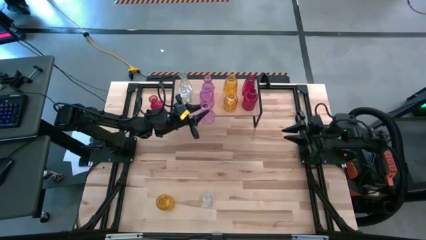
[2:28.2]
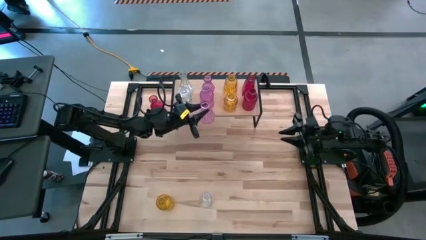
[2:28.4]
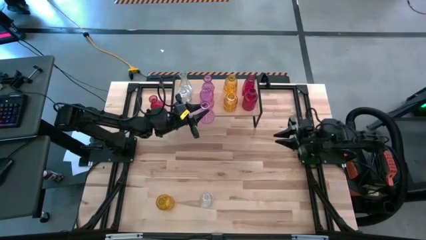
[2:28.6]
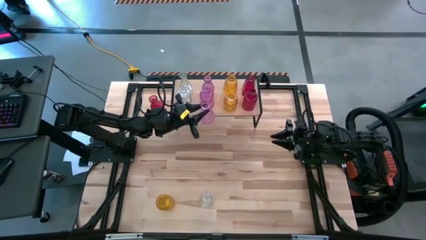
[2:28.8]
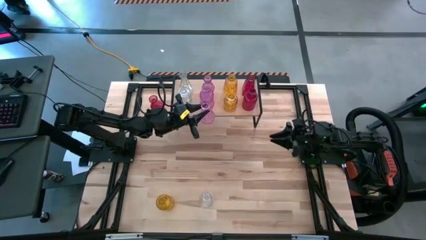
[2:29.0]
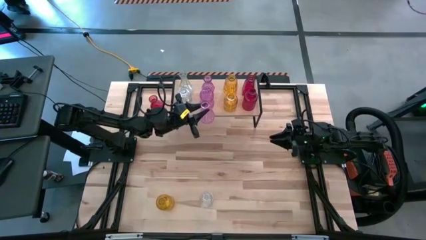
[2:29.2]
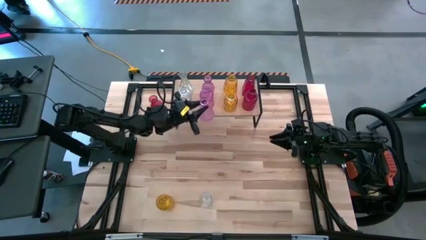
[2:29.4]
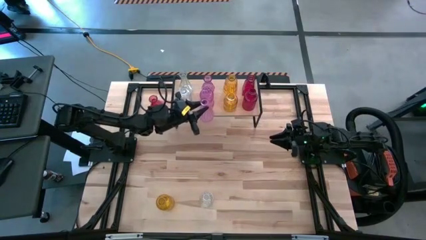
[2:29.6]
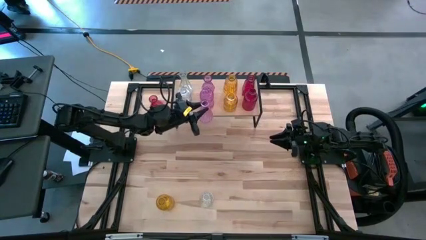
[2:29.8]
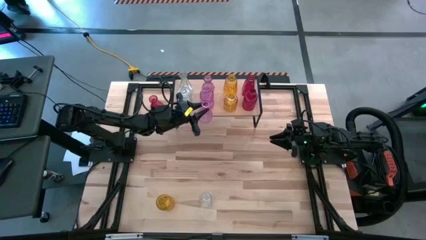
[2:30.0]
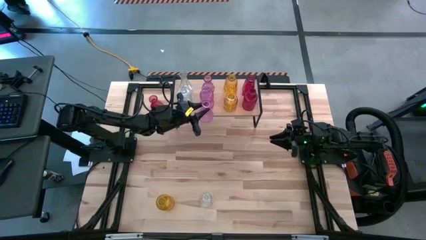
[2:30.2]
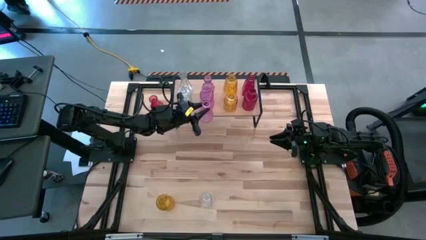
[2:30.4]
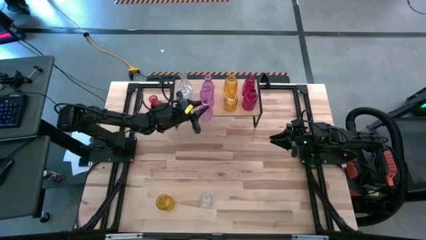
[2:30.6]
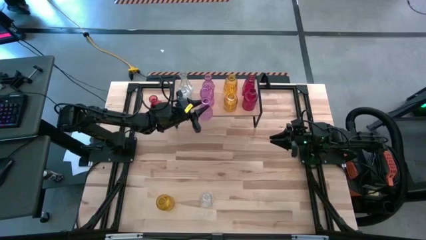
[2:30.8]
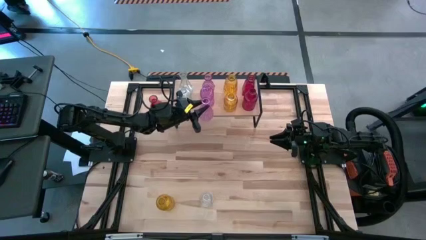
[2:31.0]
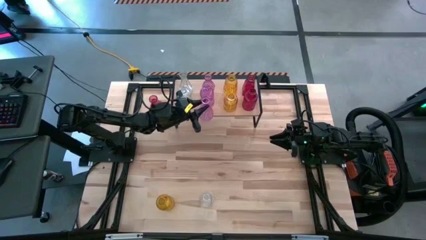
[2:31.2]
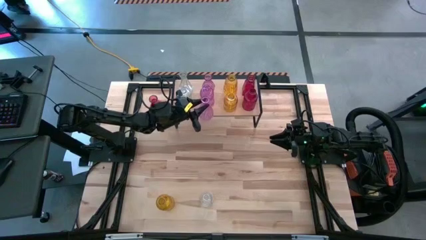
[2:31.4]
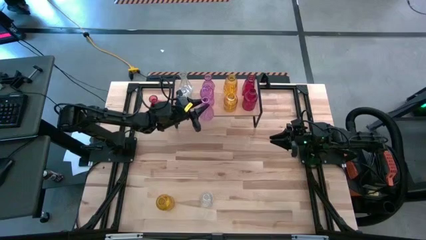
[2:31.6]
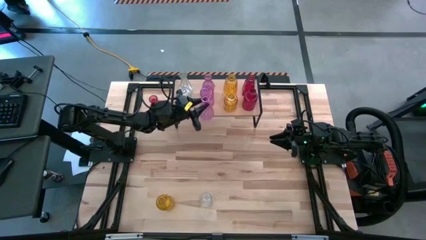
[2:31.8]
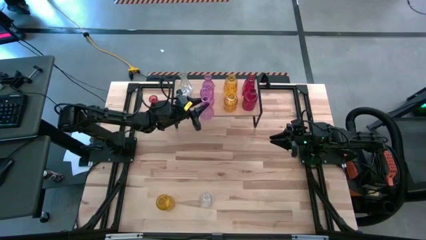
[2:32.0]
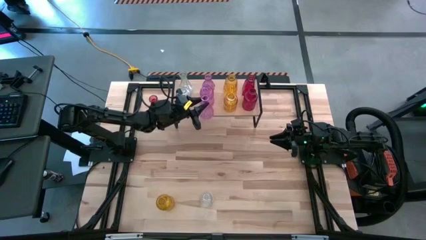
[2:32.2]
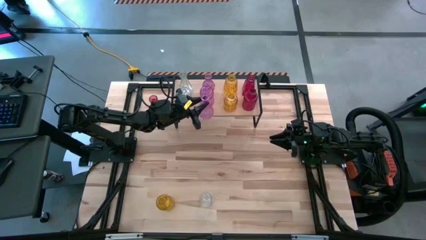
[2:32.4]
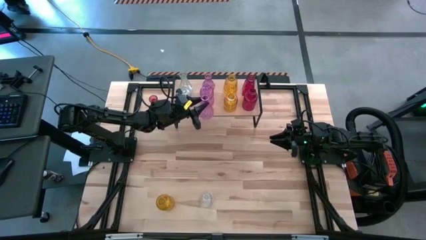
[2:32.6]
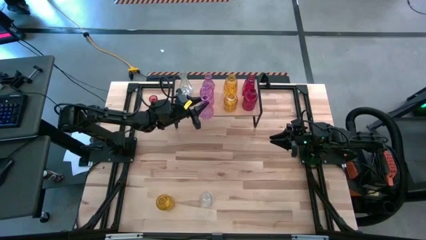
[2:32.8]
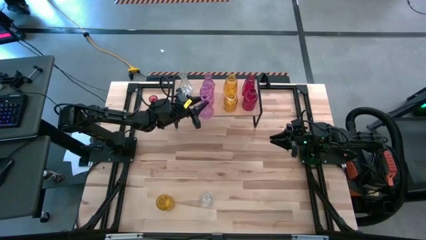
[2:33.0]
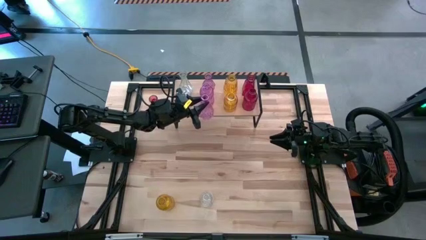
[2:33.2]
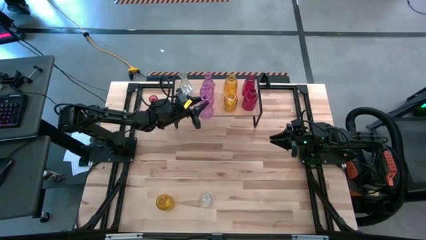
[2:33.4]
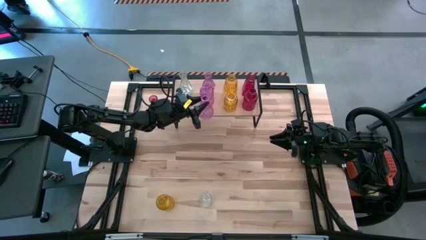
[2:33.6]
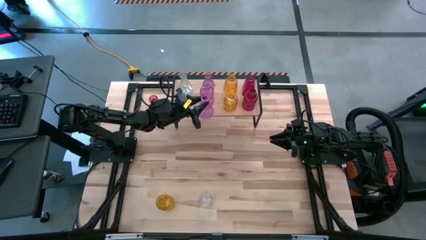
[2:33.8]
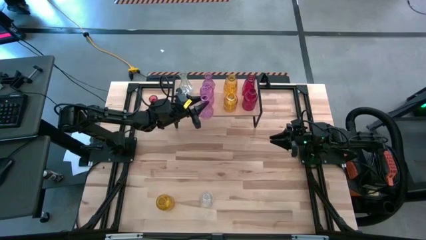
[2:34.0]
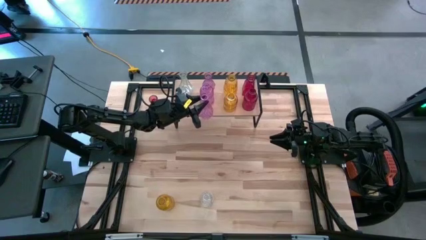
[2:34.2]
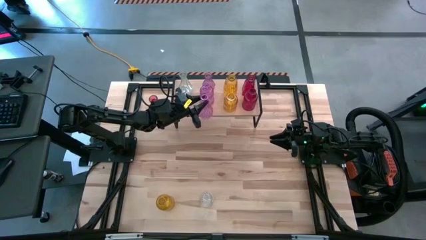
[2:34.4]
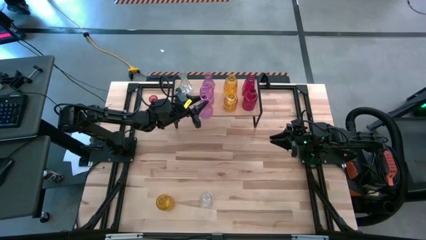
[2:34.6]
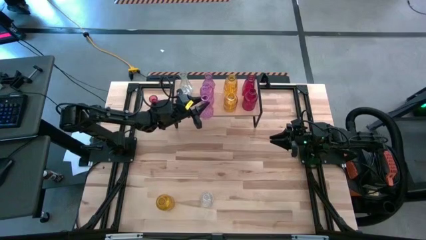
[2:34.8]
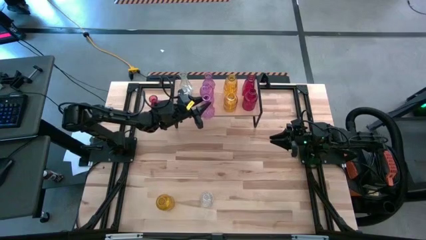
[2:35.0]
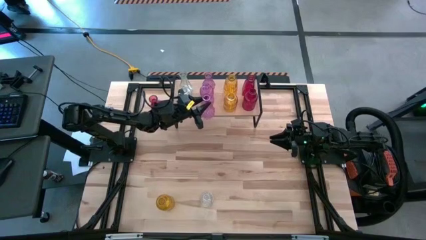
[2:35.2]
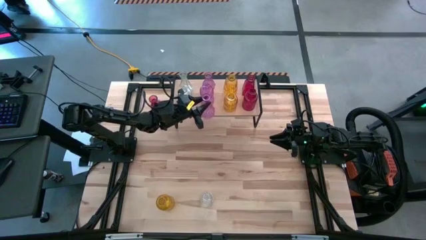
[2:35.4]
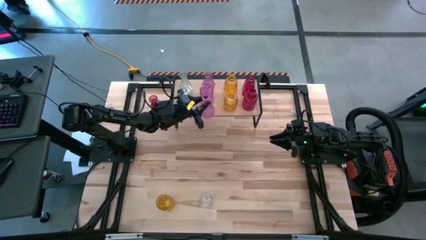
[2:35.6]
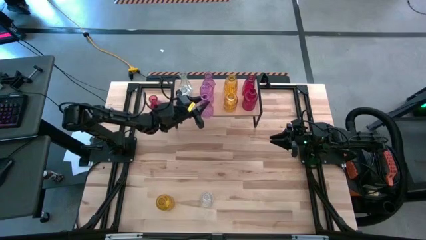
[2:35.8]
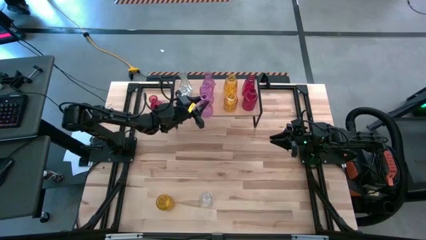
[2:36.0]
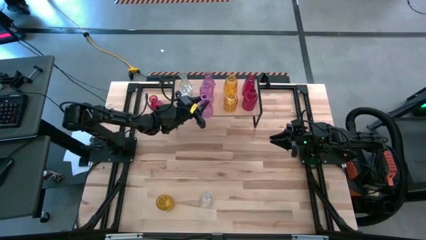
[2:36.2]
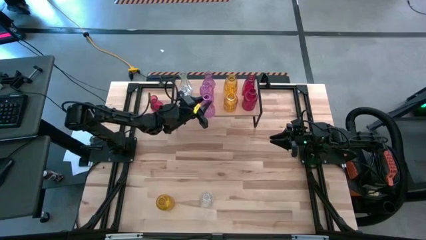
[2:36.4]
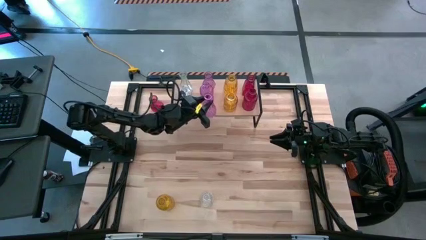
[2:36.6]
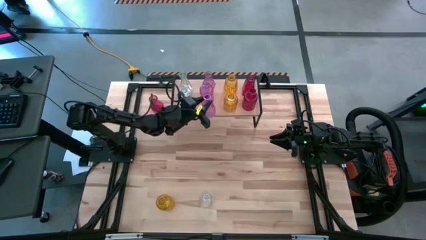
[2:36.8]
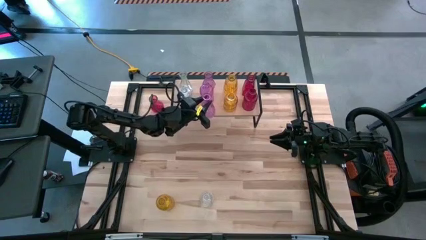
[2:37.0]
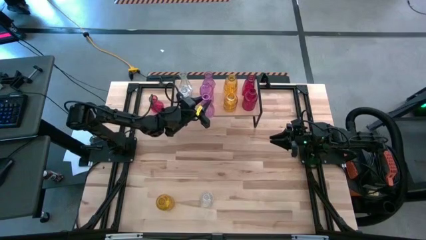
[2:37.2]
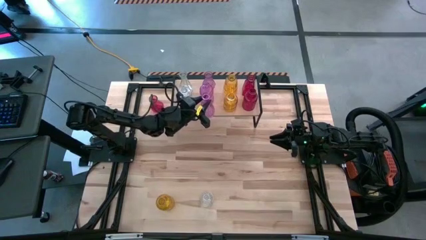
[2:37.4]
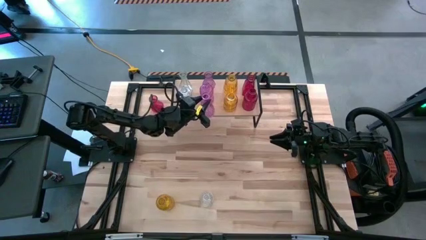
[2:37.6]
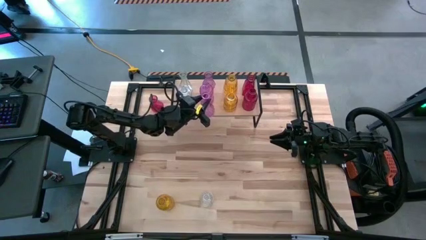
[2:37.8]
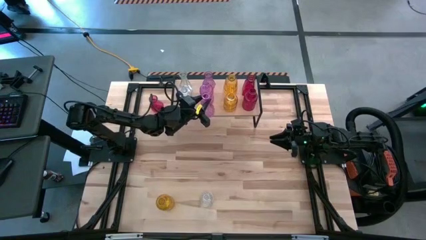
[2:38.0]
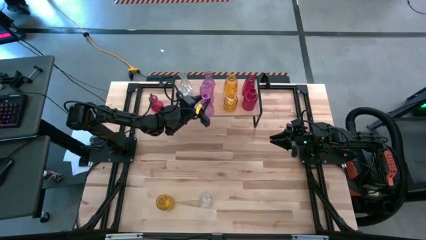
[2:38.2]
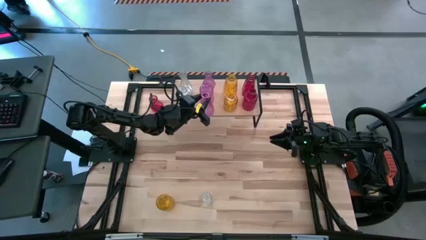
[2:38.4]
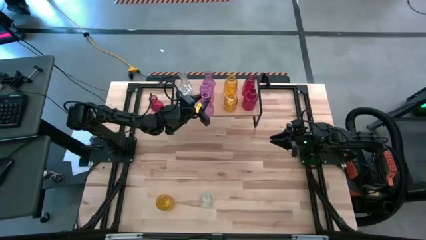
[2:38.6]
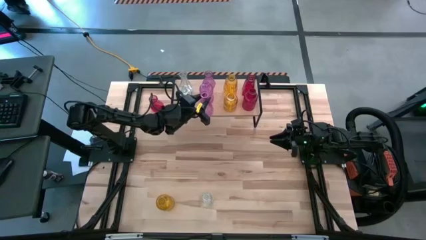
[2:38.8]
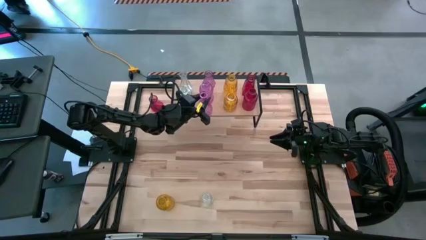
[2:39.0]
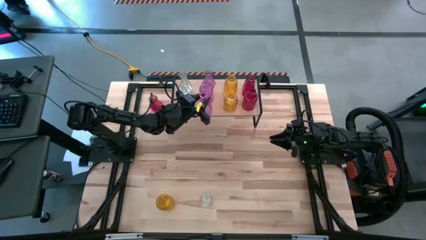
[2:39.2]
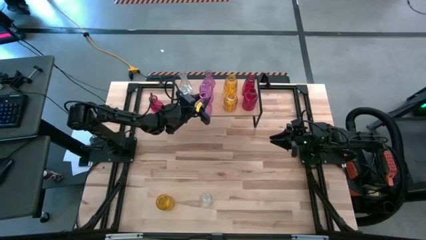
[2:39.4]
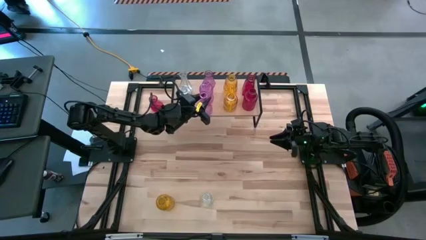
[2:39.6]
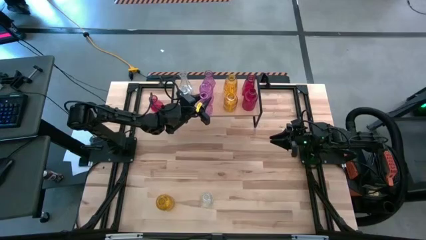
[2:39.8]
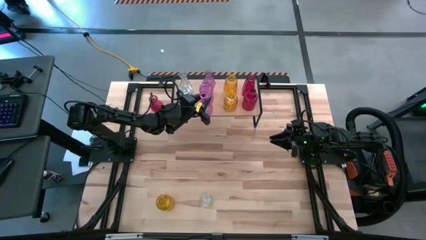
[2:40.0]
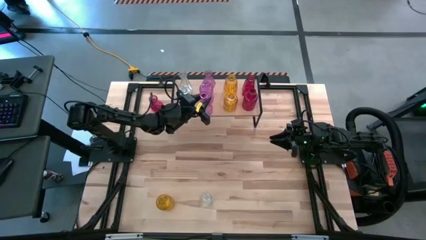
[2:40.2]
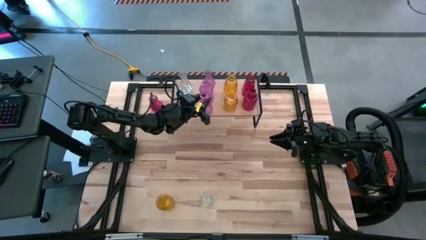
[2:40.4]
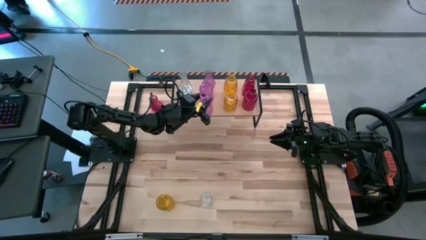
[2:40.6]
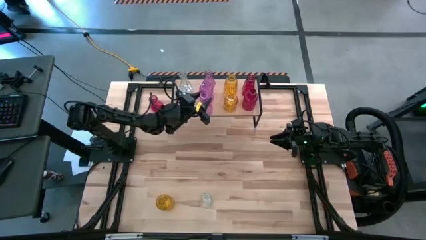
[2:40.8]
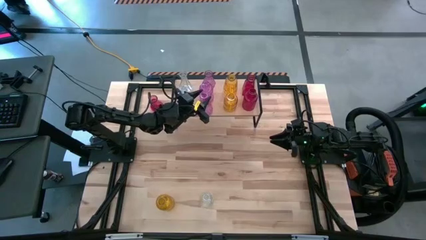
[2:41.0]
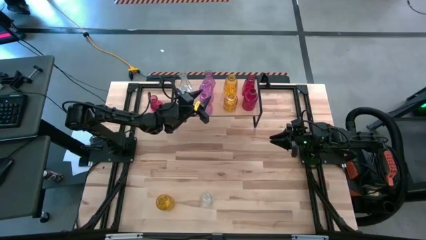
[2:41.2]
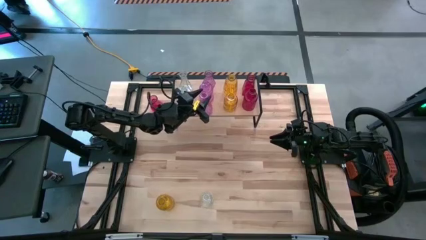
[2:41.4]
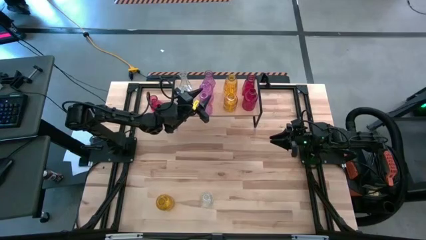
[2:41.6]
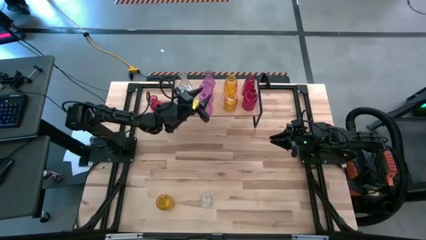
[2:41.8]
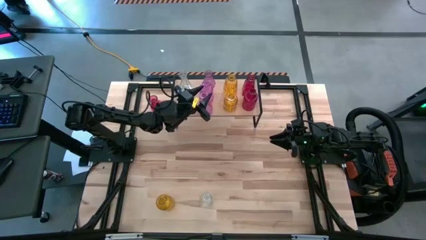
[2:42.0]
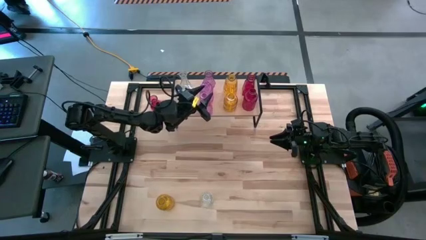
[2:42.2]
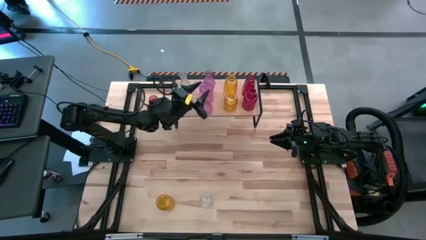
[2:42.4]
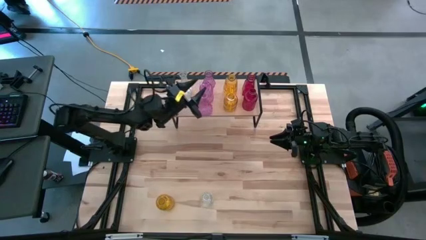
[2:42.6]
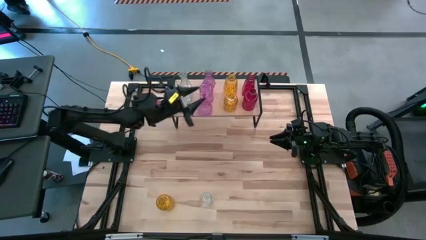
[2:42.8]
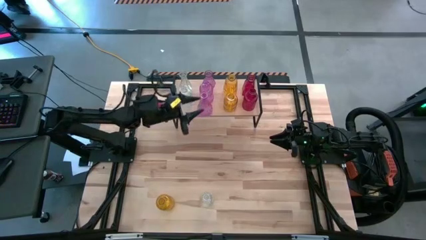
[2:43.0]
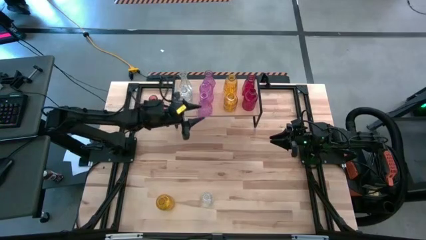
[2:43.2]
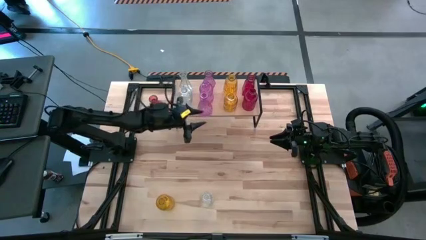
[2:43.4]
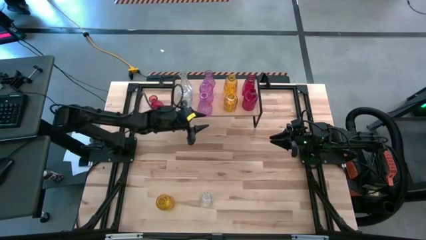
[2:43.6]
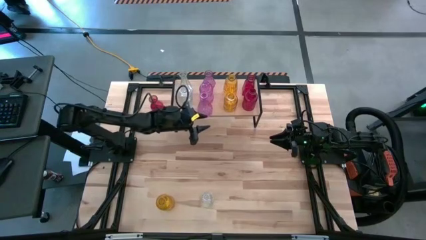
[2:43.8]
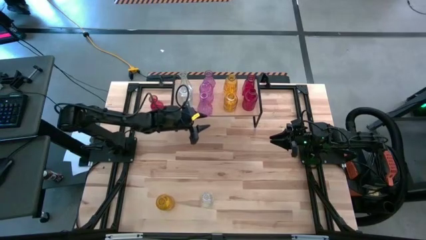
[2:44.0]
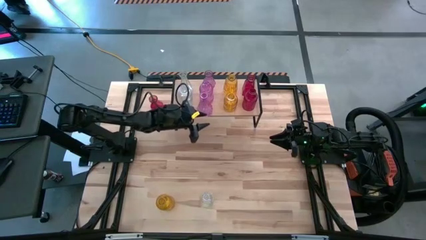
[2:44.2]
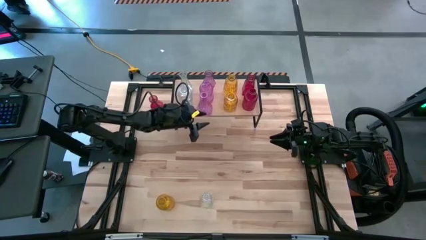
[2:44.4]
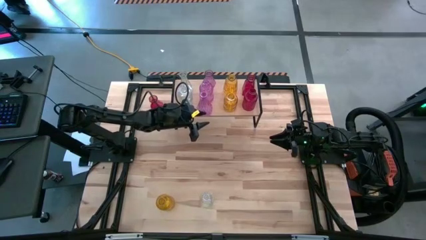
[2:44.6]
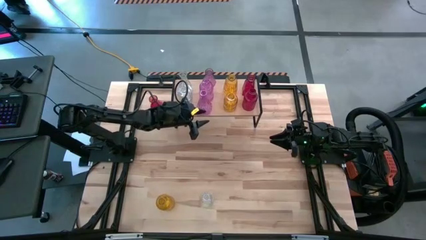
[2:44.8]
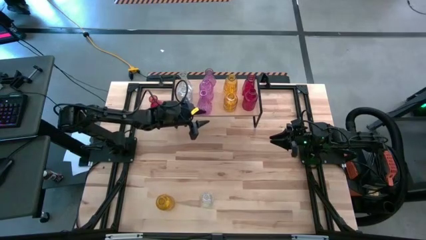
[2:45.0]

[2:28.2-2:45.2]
Task: sort vases onto shelf
Put the purple vase on the shelf aligned with the other purple vase
